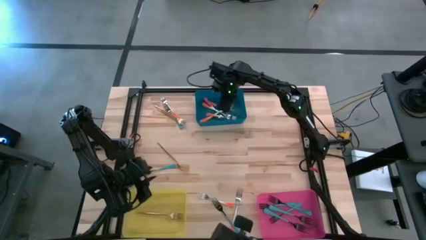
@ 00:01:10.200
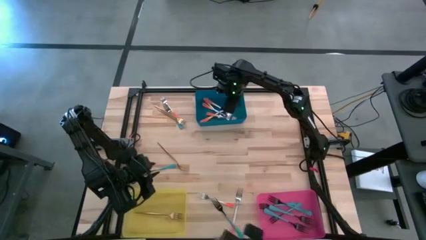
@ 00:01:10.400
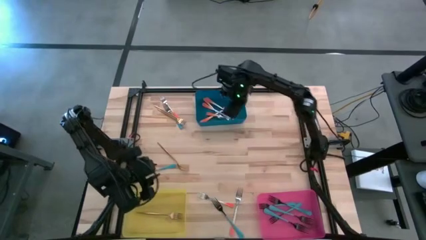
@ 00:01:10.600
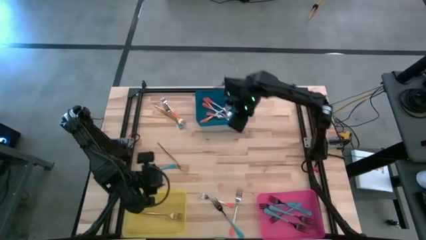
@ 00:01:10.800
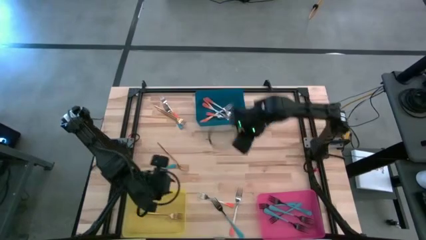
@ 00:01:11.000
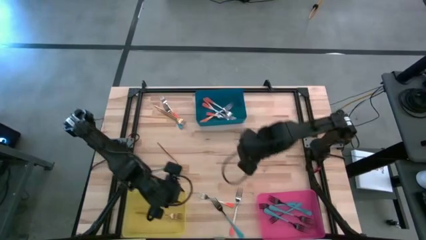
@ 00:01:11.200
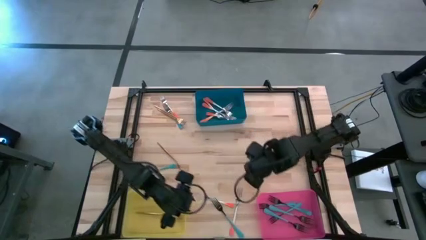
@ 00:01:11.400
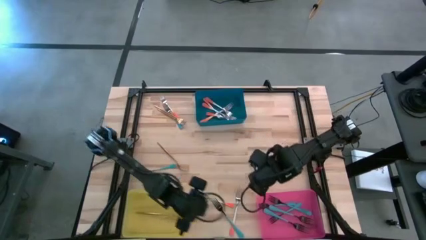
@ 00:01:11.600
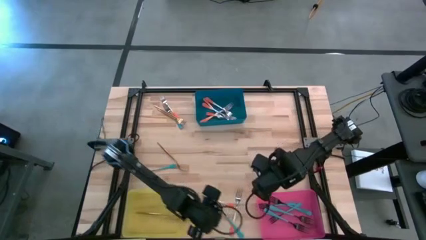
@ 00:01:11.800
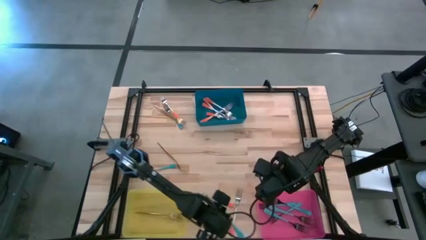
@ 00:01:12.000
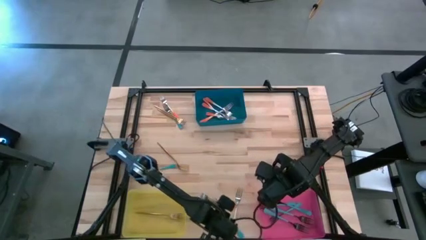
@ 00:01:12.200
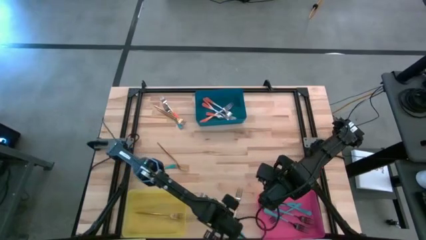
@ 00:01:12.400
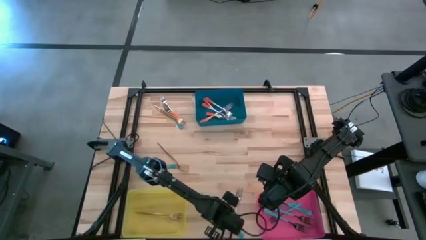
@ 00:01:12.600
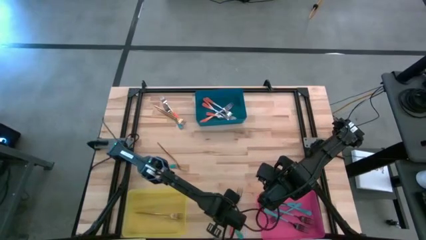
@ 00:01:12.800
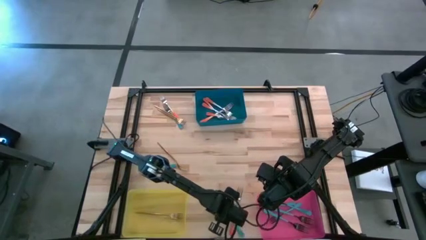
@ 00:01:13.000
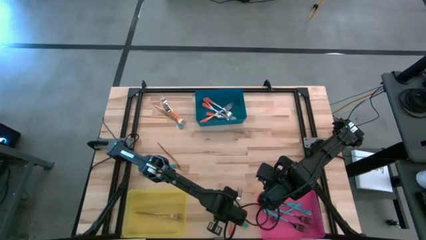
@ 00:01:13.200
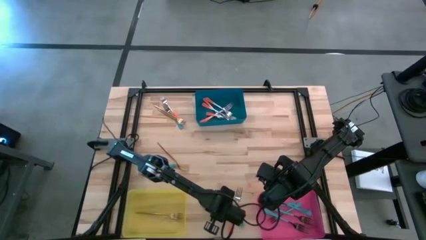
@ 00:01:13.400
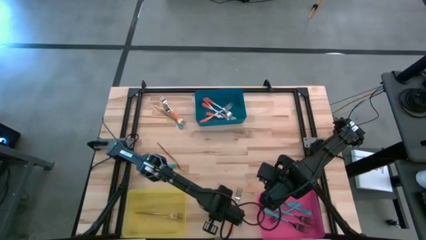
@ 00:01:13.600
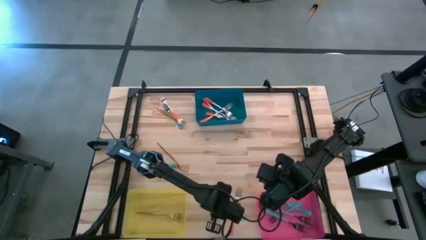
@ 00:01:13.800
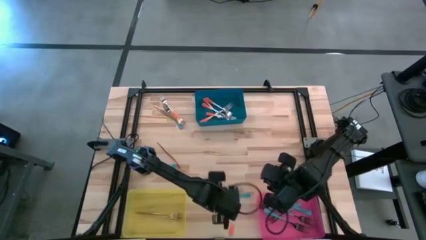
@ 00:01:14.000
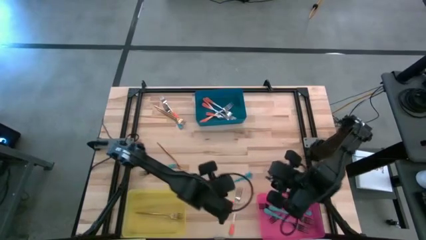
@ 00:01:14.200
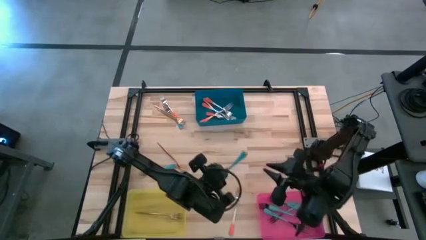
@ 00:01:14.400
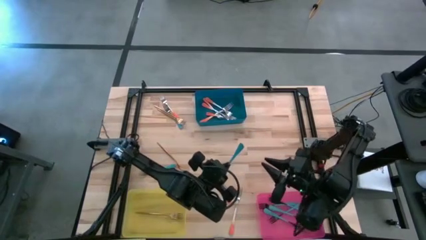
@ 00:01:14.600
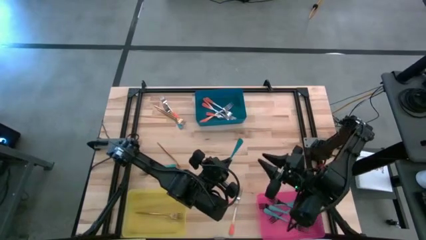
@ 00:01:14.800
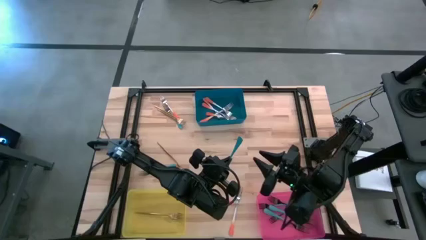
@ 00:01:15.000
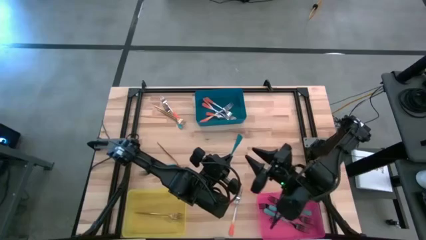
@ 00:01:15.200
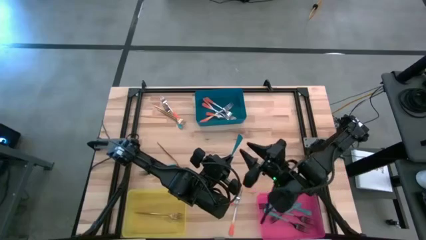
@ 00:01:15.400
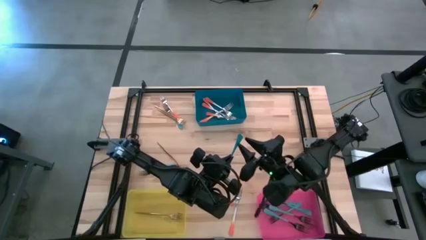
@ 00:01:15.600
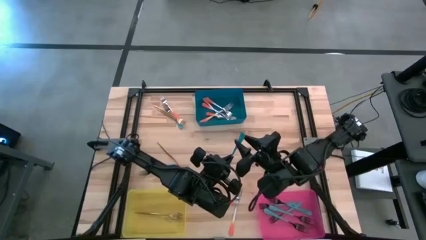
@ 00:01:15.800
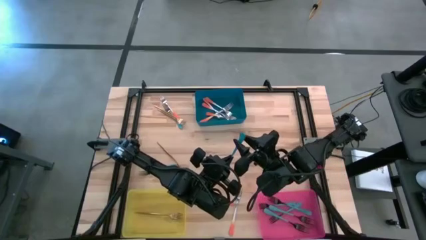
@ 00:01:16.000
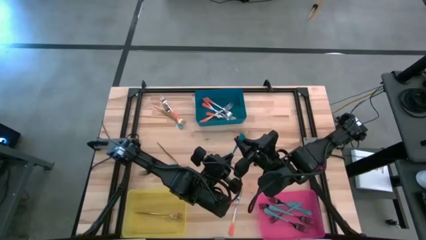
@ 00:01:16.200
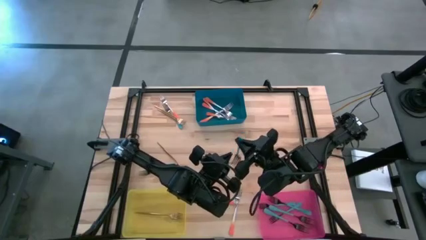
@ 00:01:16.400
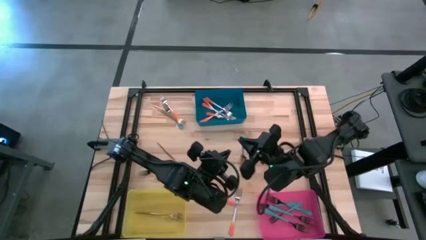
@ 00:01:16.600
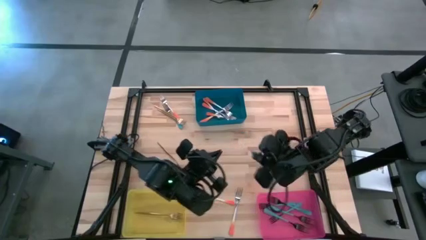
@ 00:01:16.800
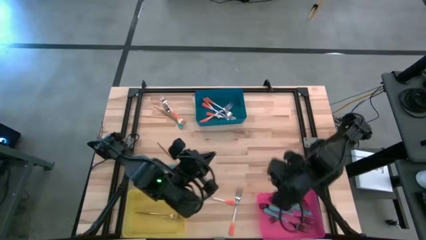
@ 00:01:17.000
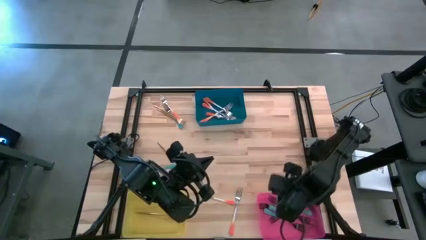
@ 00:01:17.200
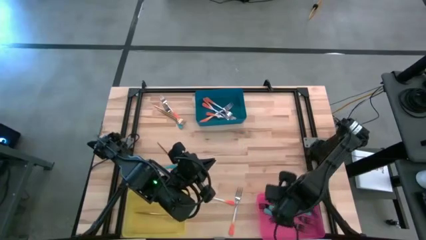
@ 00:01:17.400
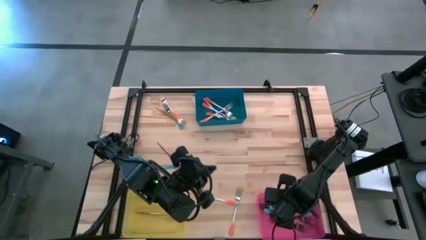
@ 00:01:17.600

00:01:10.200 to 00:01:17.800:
Task: Sort silverware by color (type)
Put the blue fork into the pink bin

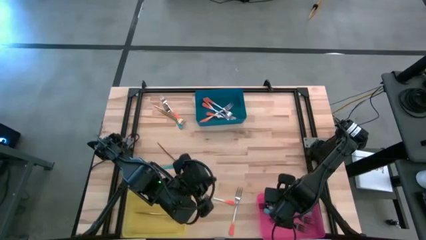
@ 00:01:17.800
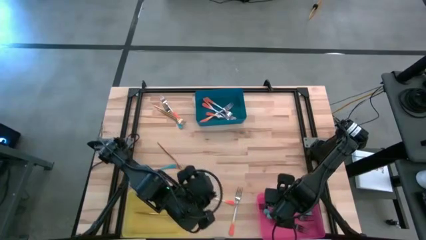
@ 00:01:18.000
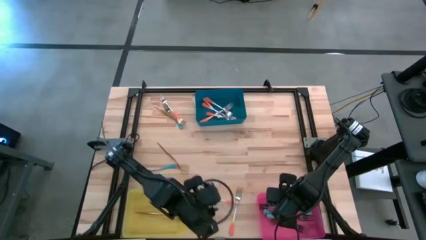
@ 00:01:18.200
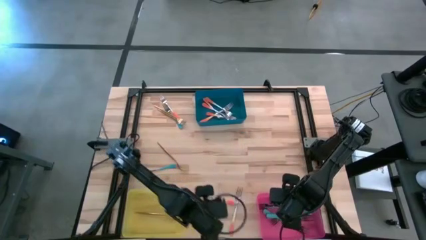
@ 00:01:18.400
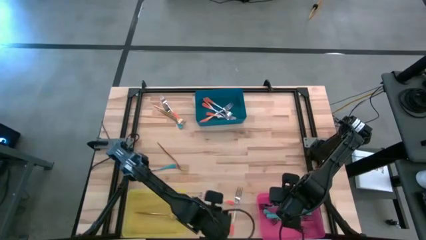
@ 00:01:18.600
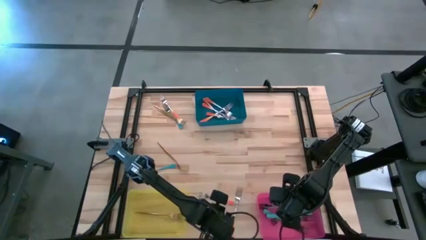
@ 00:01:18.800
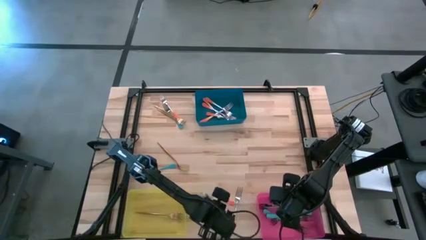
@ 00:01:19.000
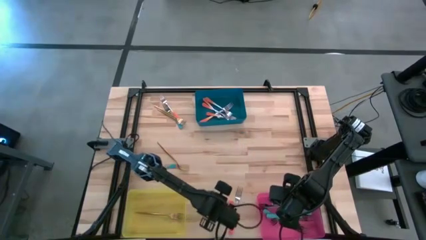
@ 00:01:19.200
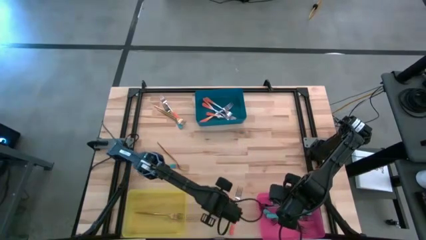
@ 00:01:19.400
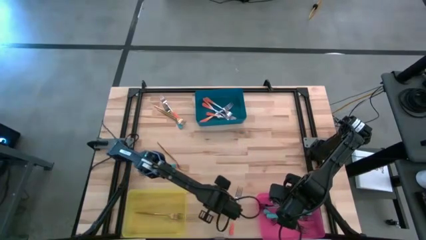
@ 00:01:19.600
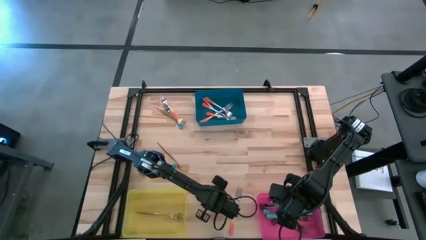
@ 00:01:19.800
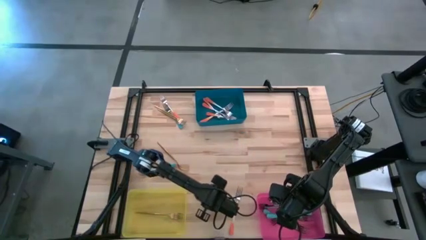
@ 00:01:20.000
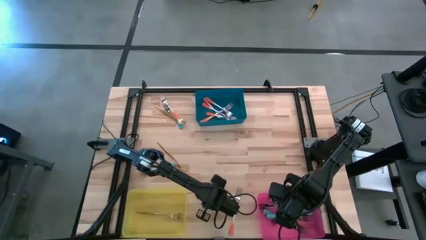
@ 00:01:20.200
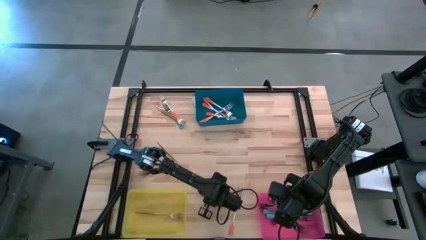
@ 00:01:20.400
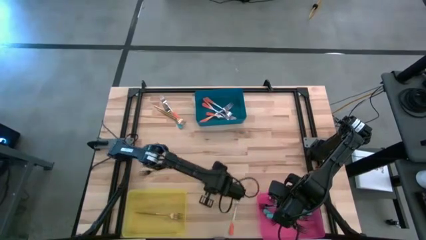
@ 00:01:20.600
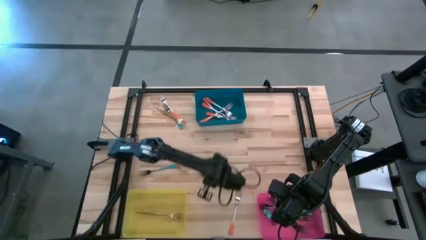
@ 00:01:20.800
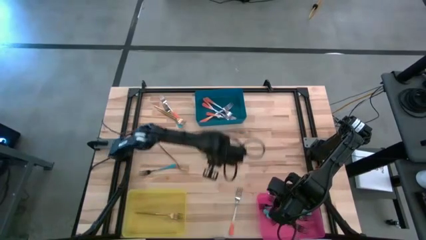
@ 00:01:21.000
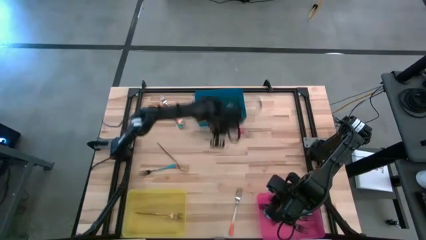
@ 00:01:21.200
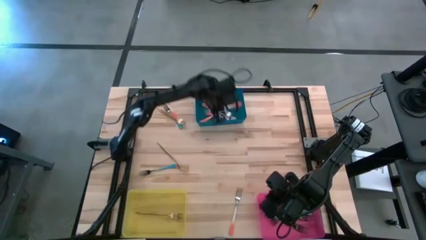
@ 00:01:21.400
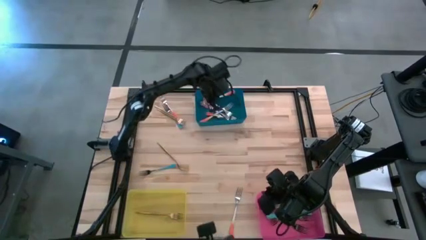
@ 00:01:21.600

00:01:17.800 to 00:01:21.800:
Put the orange fork into the blue bin

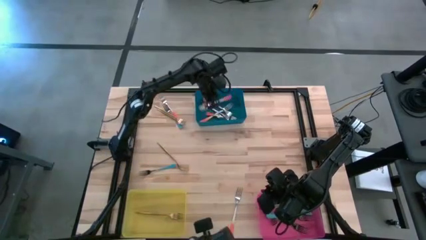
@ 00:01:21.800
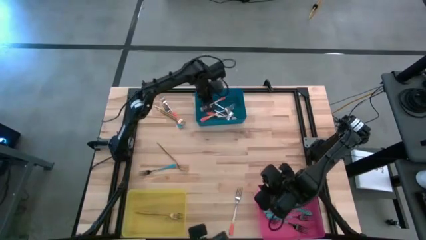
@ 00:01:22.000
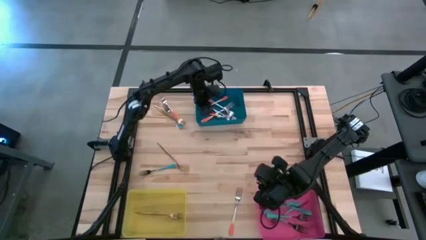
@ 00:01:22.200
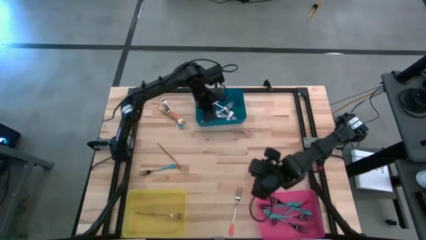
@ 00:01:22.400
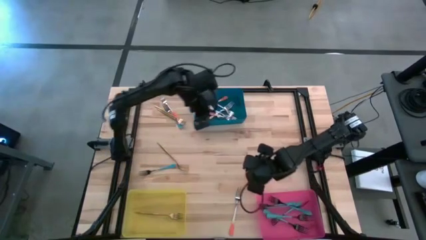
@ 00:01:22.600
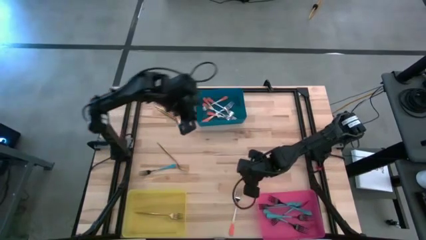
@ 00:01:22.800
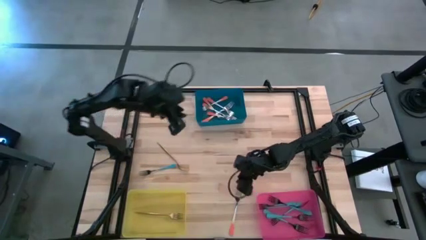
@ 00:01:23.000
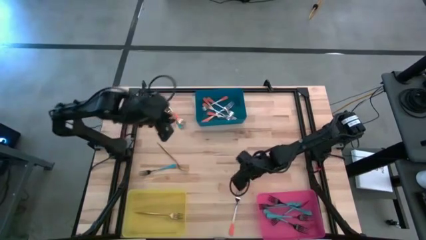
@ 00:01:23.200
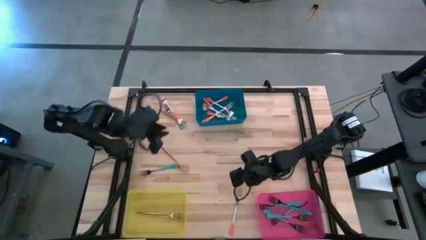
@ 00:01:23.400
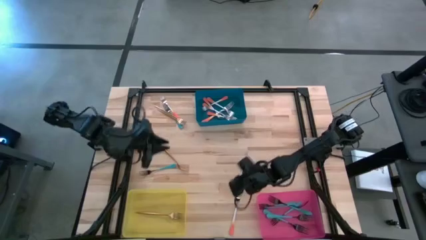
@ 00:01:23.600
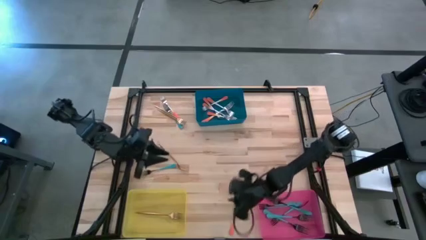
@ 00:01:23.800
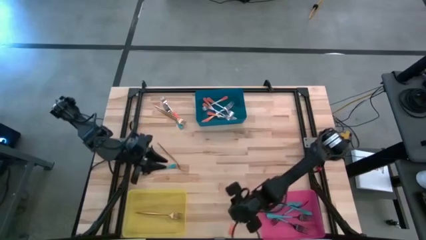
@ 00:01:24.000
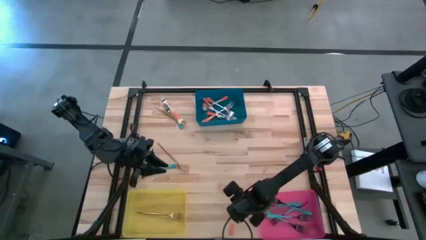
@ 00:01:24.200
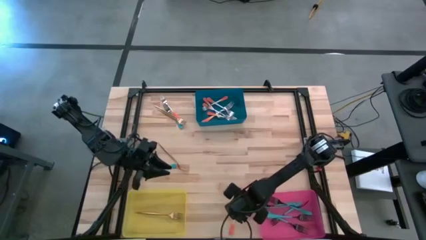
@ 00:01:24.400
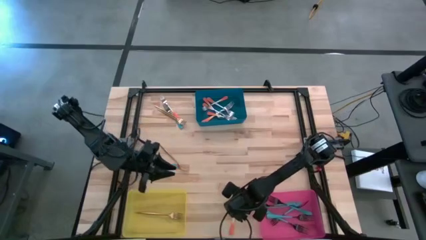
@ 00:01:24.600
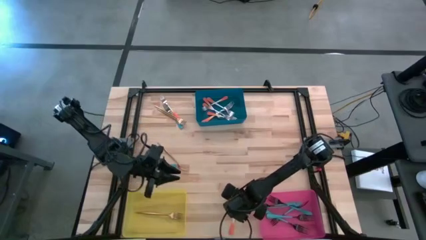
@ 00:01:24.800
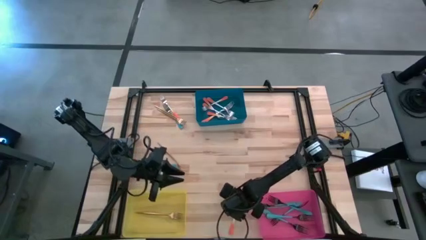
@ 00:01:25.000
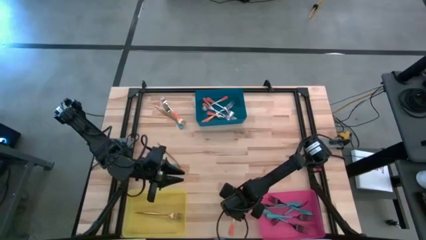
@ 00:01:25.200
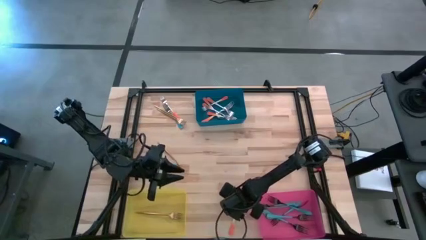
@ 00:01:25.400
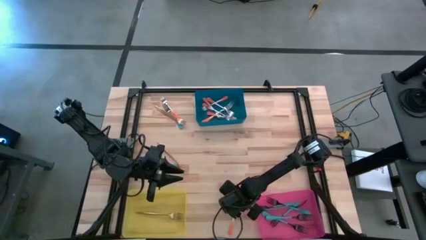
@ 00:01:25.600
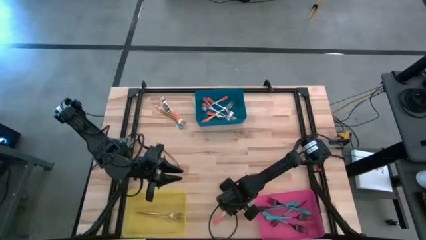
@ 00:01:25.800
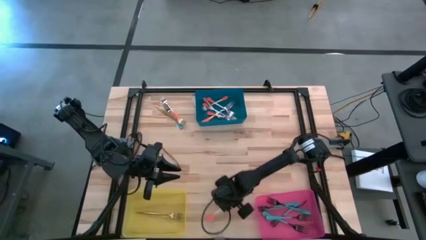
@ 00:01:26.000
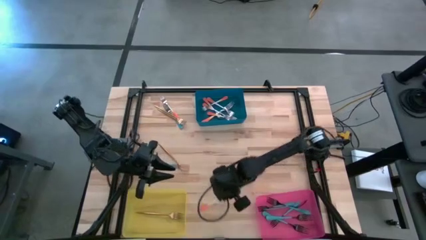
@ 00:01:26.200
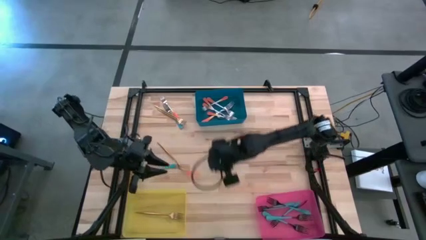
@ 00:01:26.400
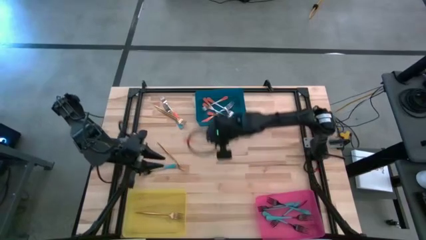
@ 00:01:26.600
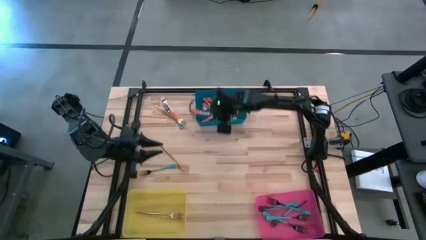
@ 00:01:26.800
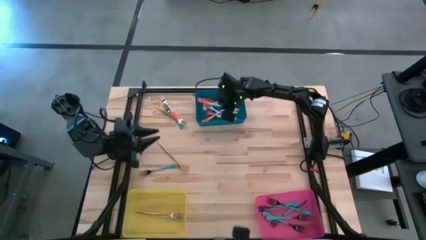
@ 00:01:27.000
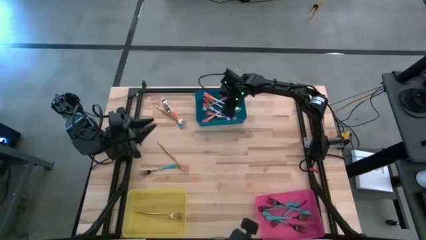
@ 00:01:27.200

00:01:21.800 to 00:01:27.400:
Put the orange fork into the blue bin
